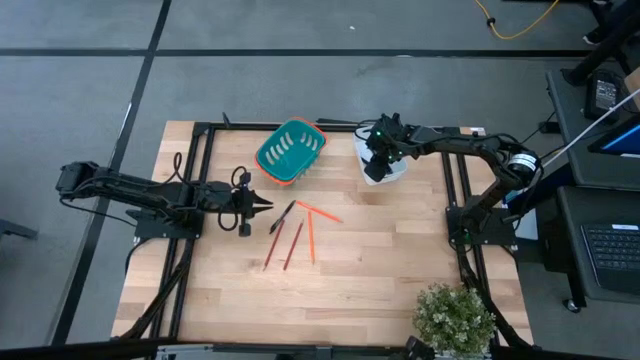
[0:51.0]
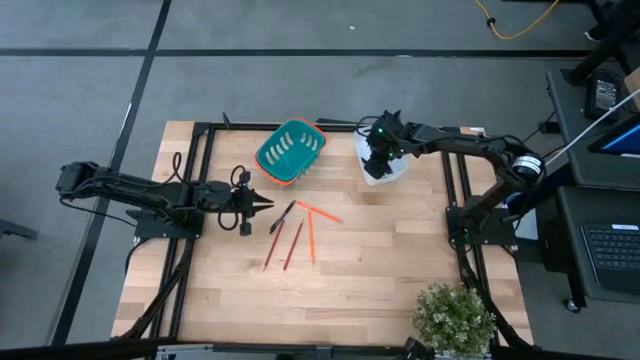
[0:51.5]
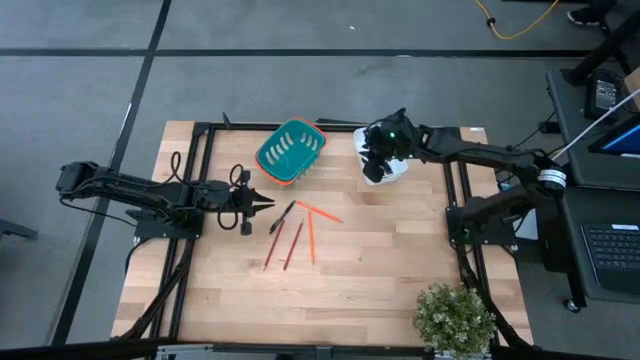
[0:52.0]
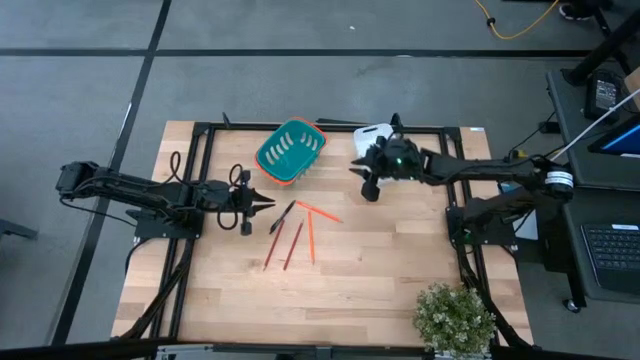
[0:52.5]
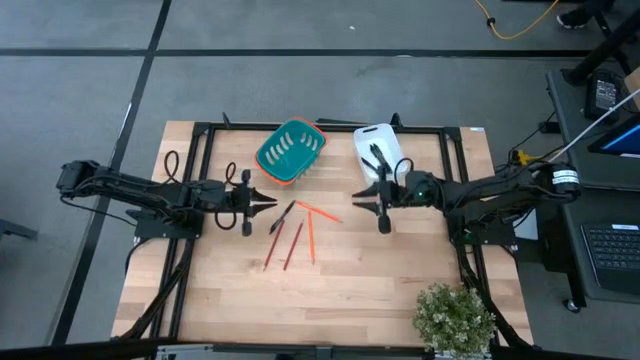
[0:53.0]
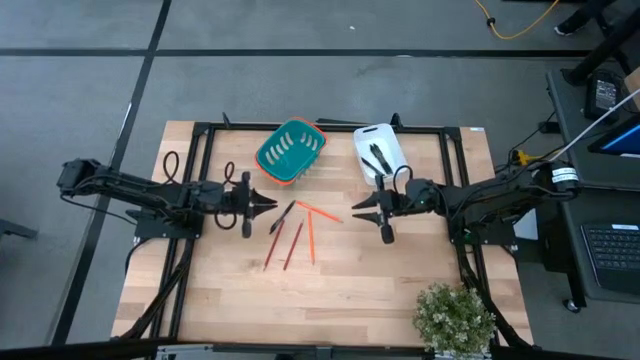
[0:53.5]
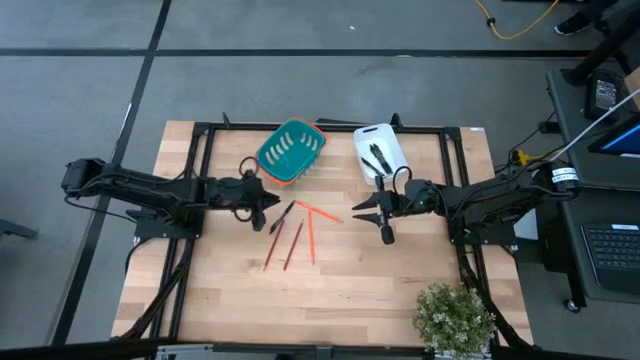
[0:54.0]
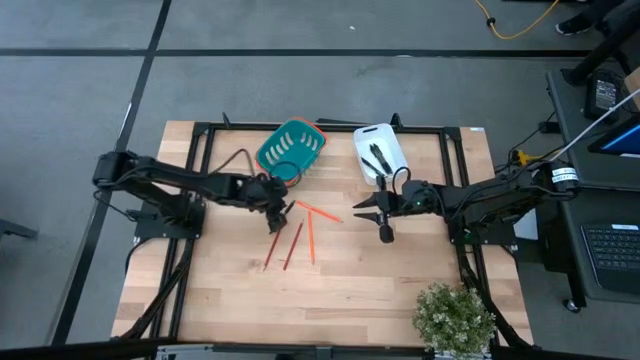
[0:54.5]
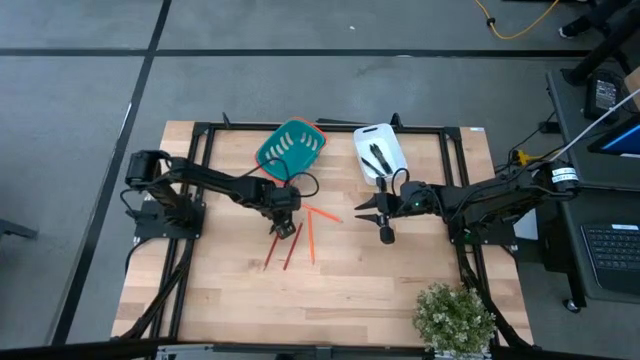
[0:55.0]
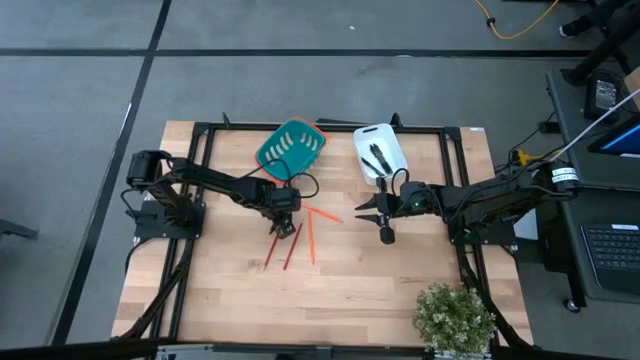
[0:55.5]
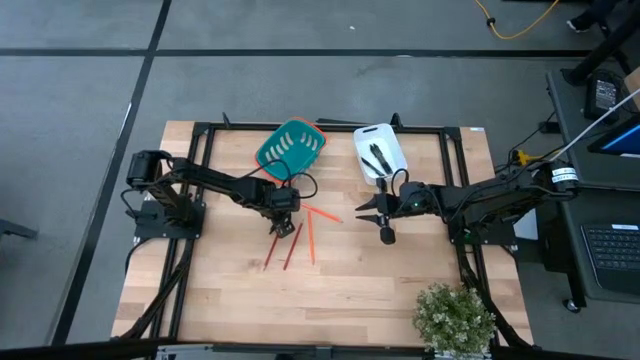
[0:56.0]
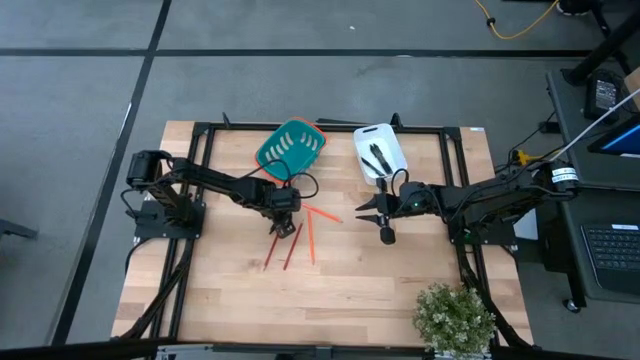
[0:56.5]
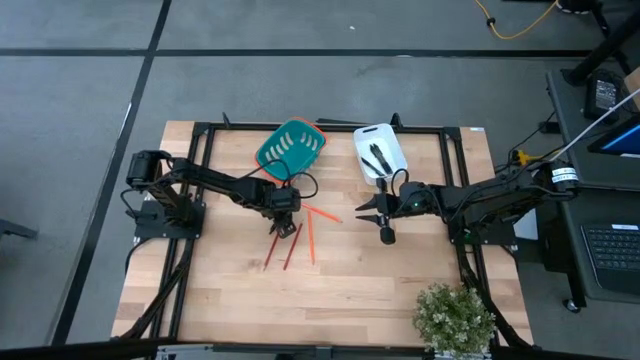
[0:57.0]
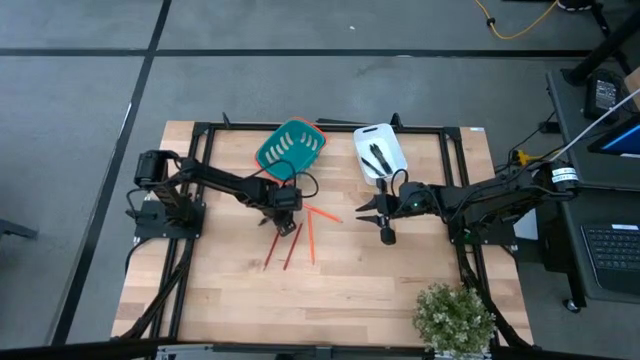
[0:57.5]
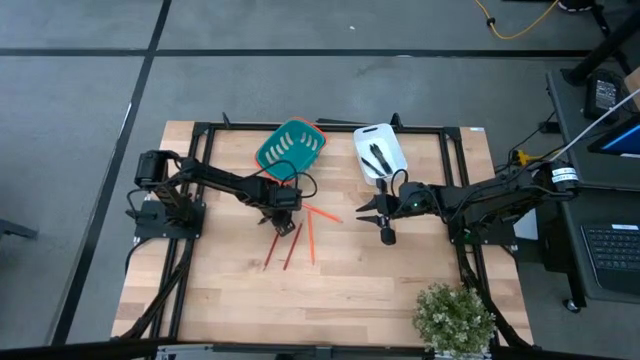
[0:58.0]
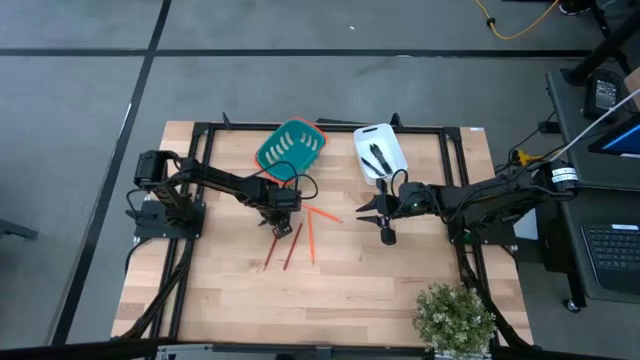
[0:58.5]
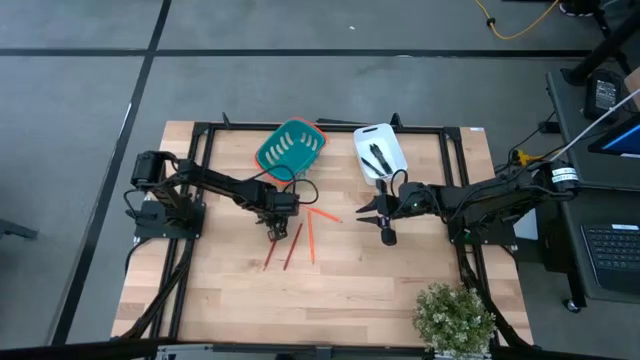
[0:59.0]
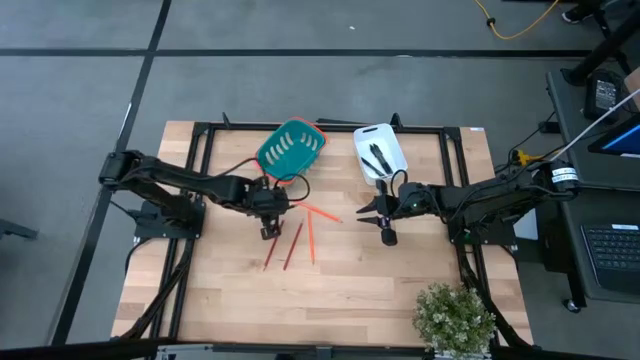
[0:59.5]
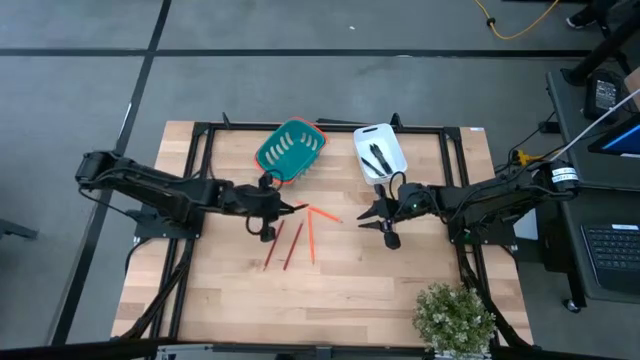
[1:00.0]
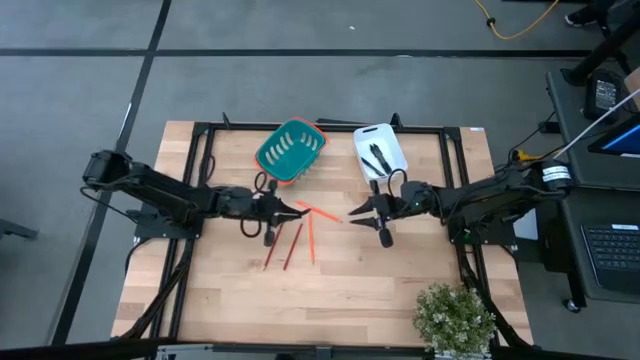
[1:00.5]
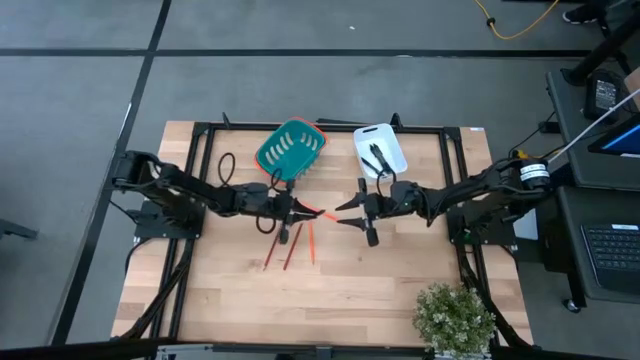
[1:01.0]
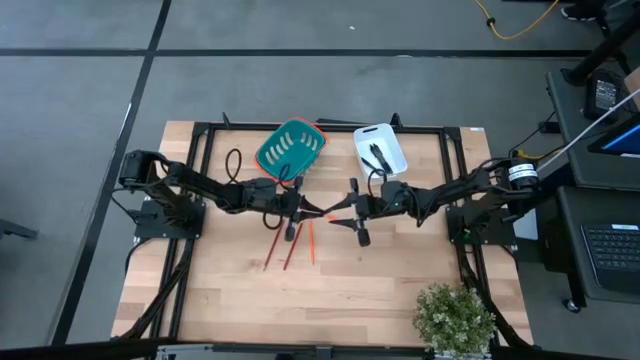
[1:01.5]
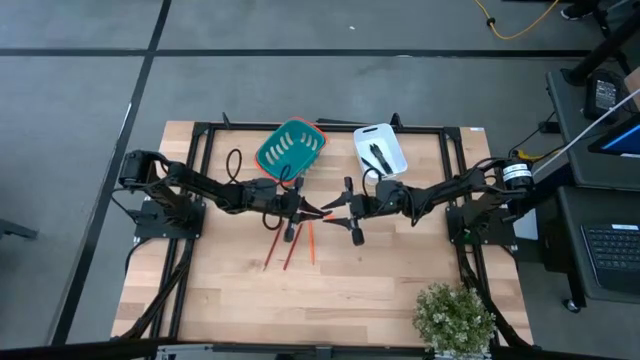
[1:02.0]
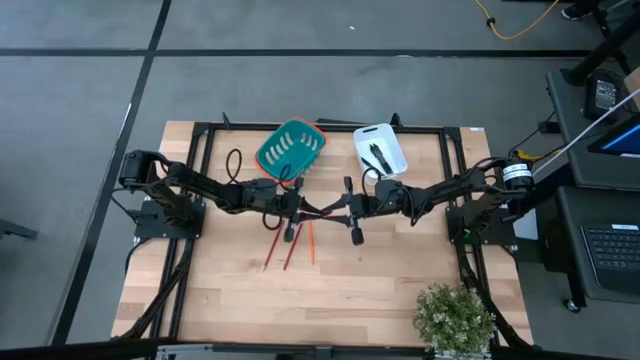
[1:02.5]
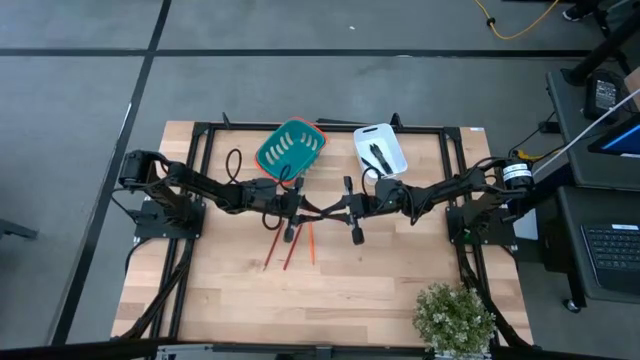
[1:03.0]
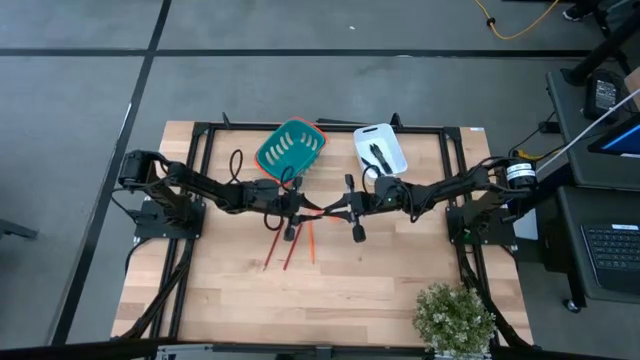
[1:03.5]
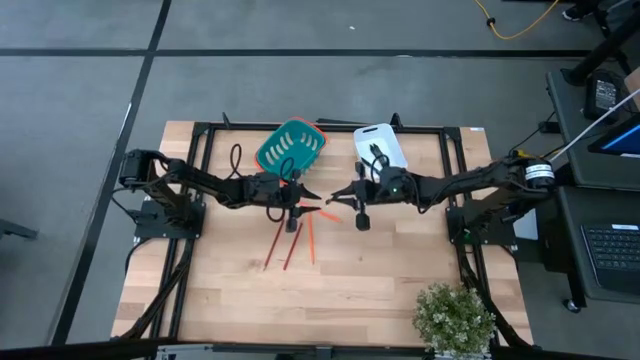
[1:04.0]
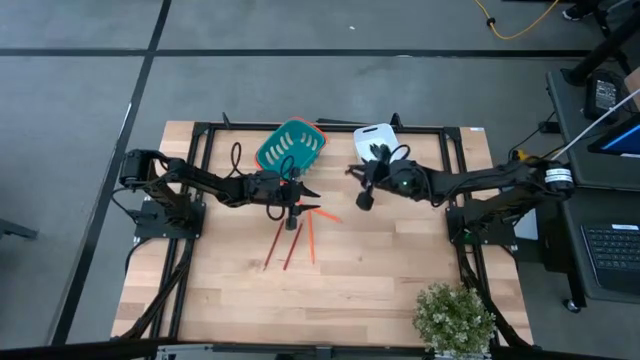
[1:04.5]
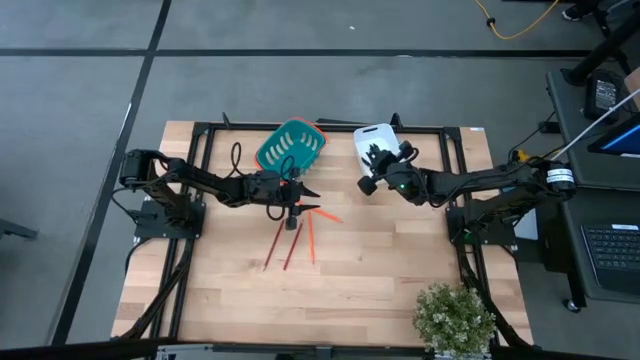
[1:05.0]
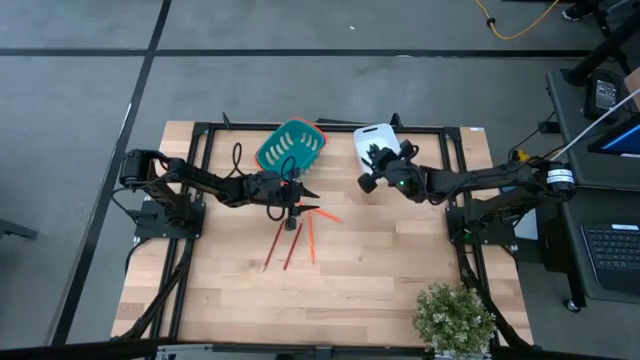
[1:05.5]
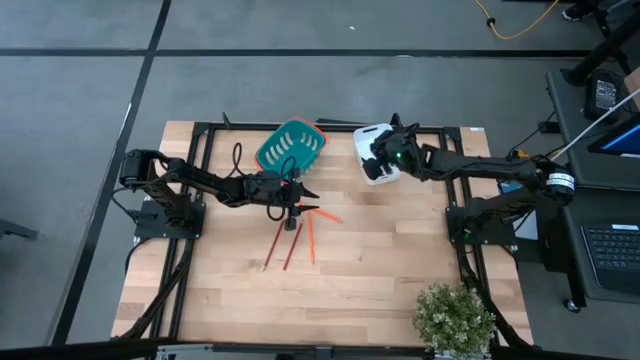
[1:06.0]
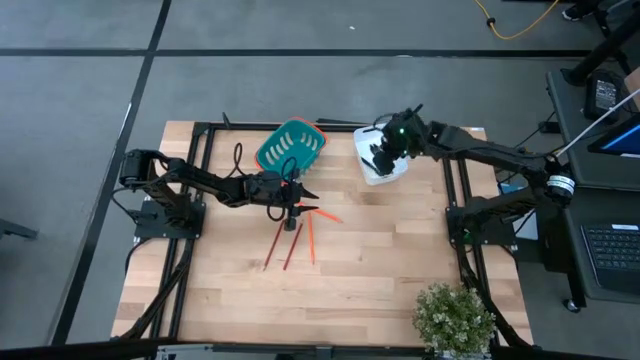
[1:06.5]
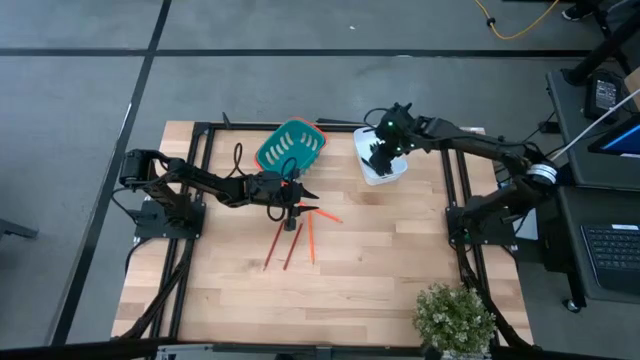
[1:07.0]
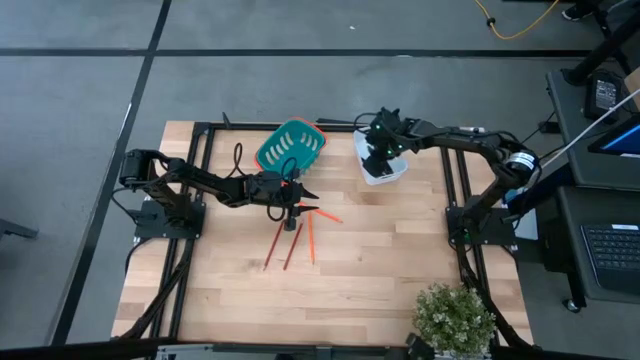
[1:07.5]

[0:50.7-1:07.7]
Task: Sort pens & pencils
Put the black pen into the white bin

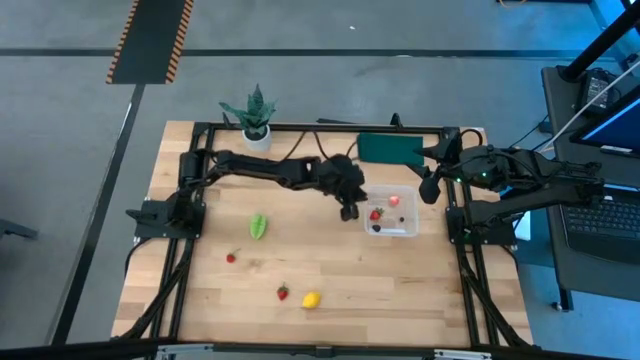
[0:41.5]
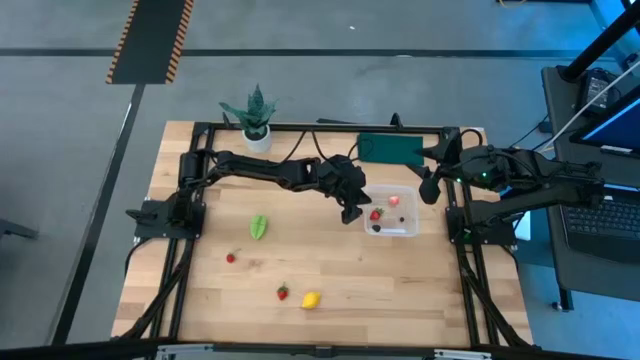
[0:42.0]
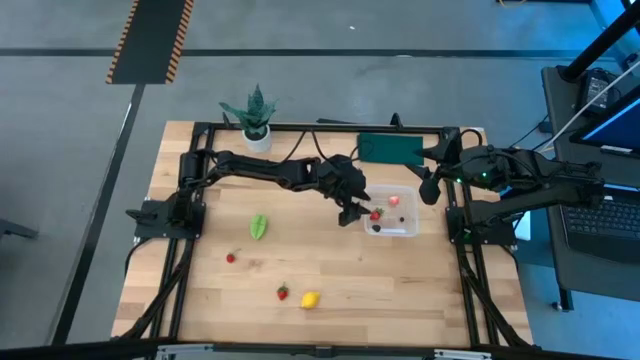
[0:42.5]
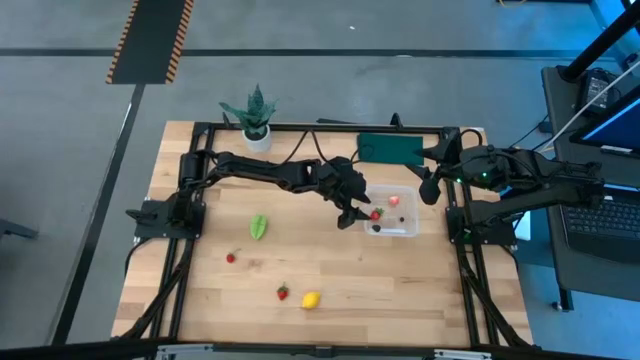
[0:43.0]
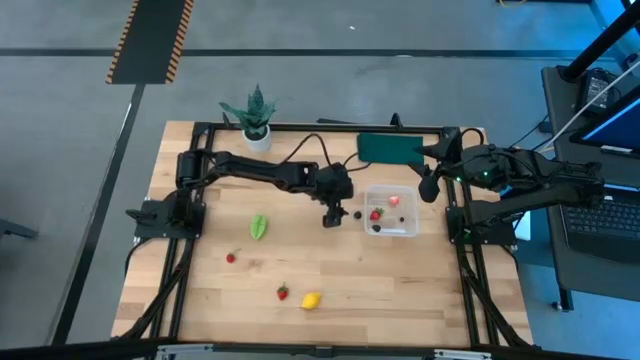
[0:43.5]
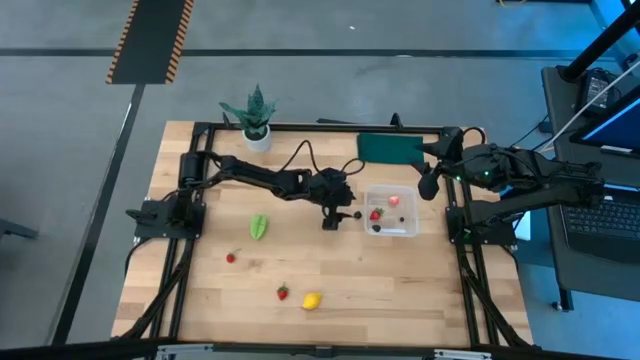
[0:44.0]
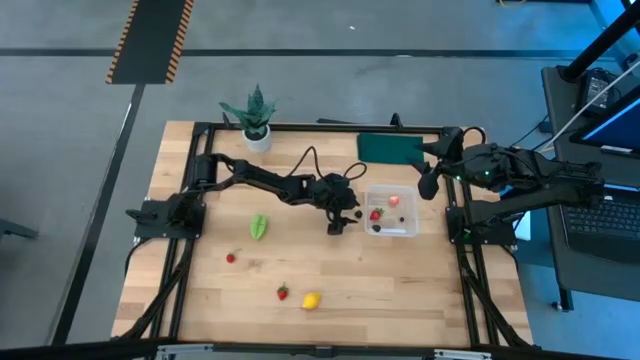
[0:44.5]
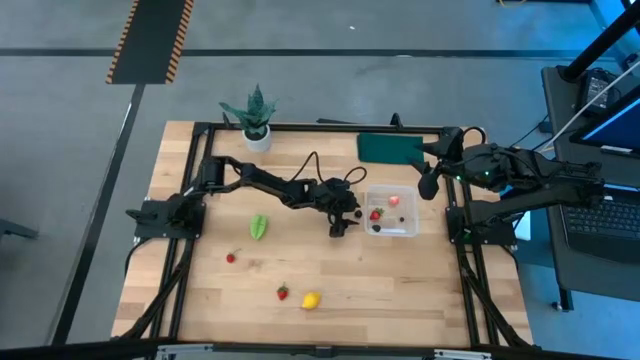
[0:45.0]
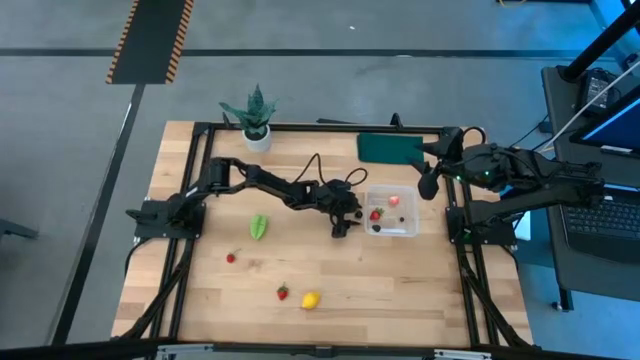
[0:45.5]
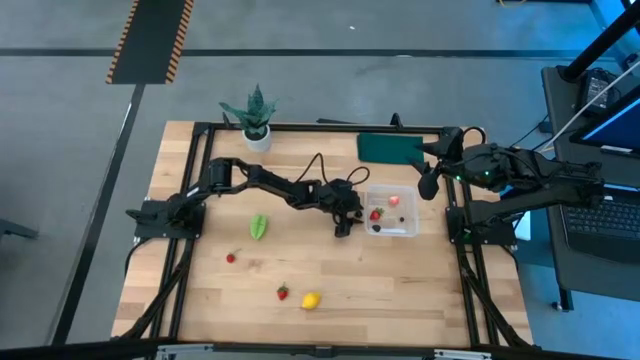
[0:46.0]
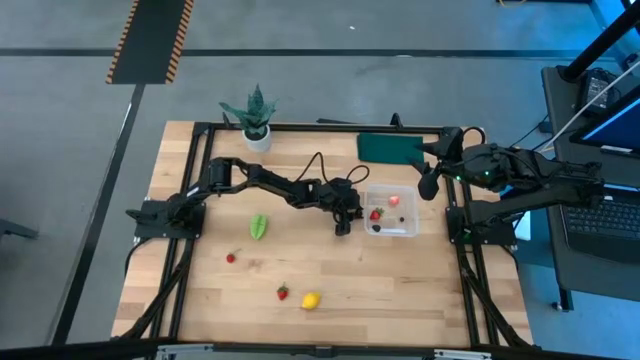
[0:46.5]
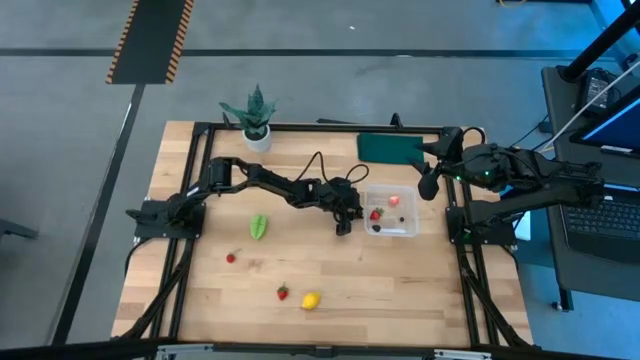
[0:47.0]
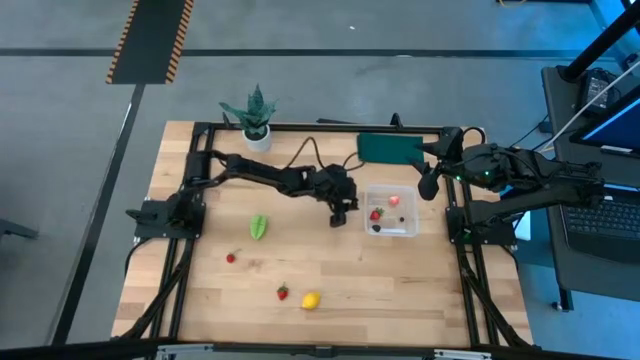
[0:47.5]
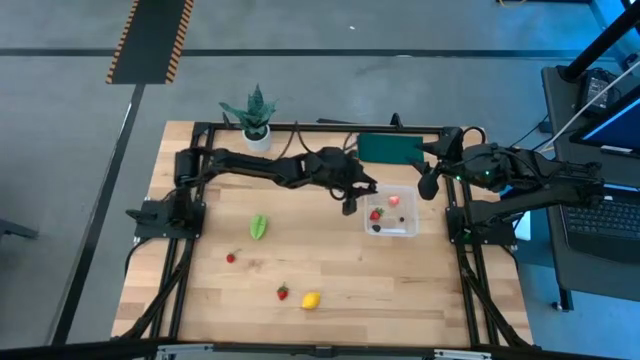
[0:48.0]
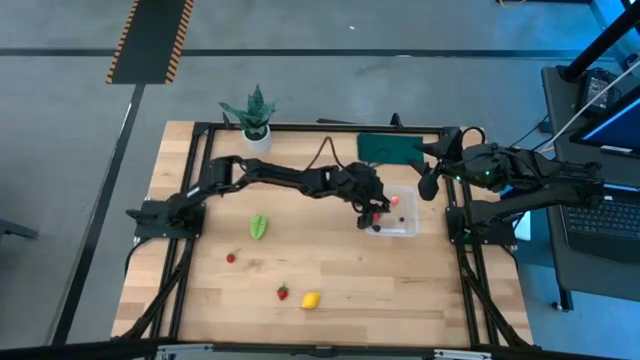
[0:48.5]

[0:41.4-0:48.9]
Task: Pick and placing Produce into tupperware
Put the black cherry into the transparent container
